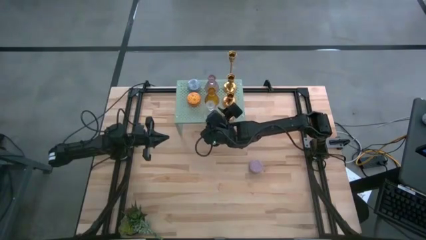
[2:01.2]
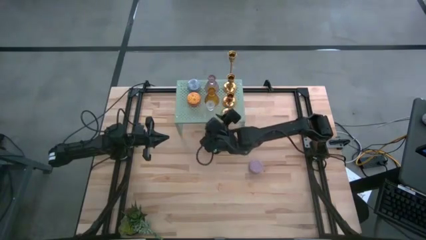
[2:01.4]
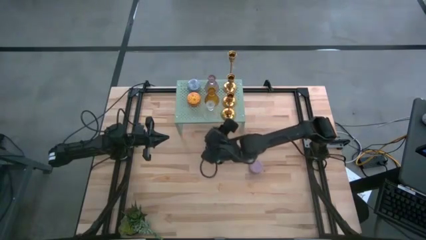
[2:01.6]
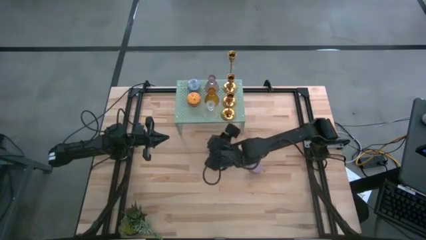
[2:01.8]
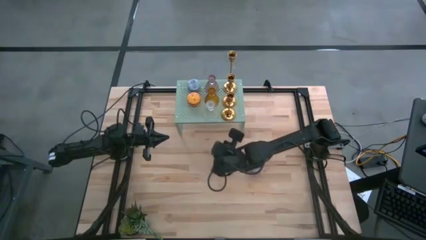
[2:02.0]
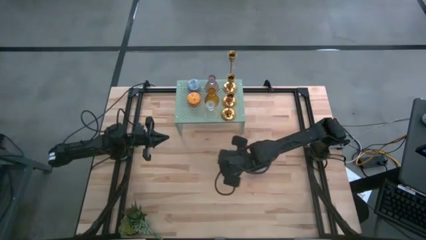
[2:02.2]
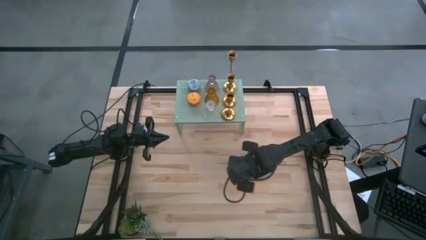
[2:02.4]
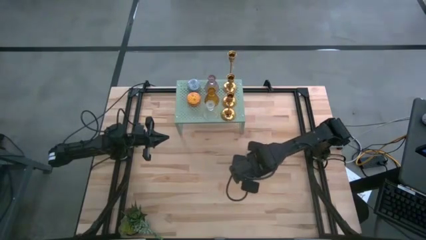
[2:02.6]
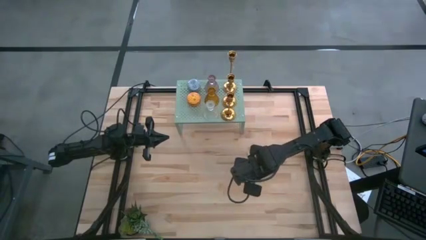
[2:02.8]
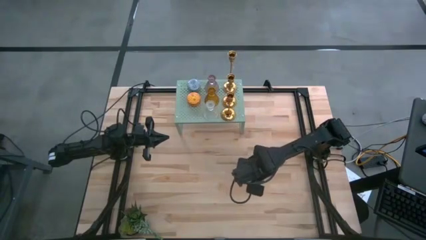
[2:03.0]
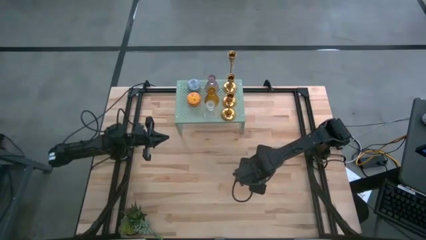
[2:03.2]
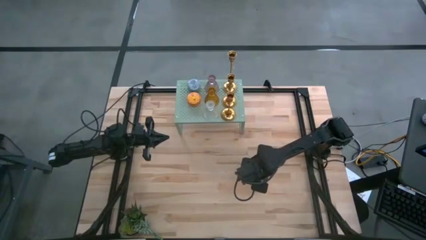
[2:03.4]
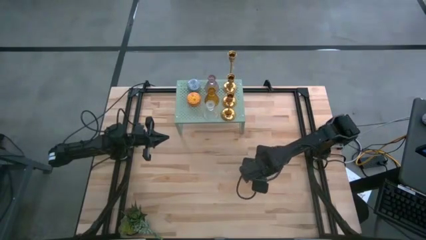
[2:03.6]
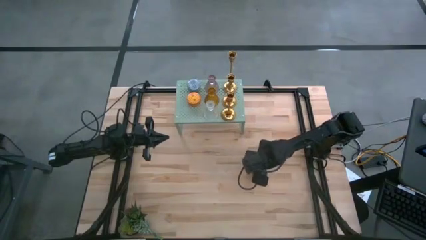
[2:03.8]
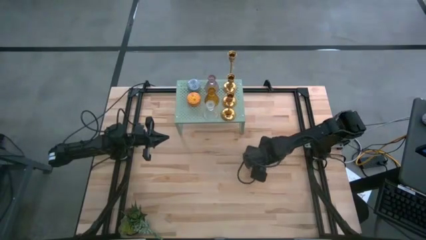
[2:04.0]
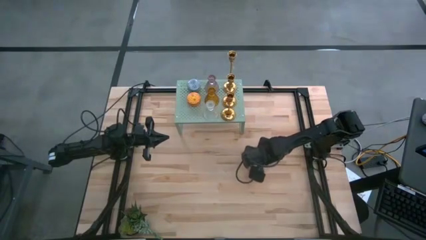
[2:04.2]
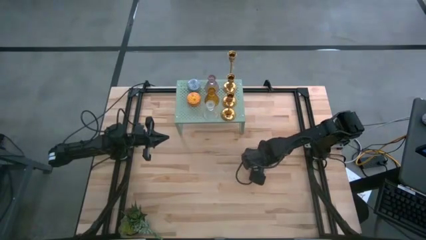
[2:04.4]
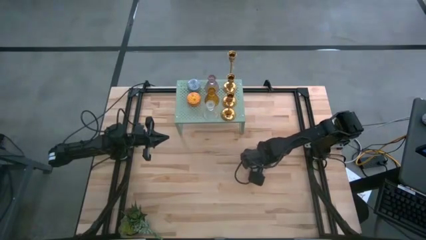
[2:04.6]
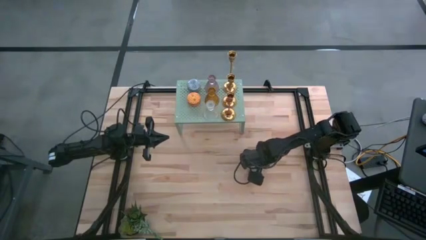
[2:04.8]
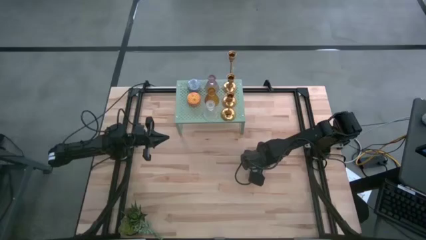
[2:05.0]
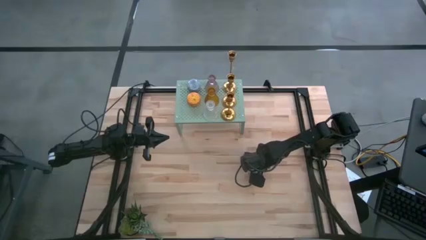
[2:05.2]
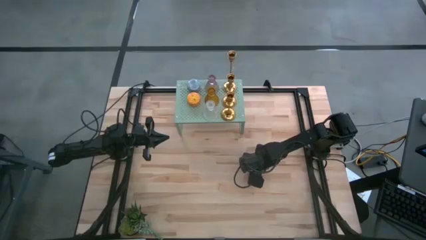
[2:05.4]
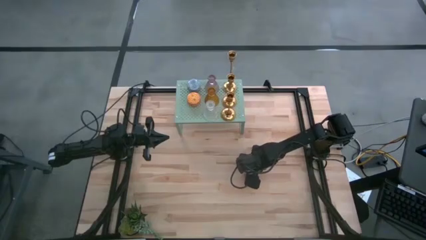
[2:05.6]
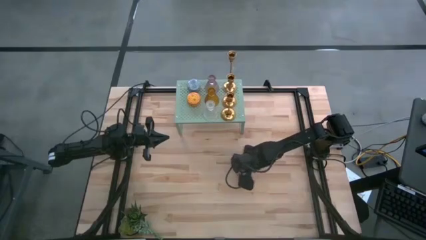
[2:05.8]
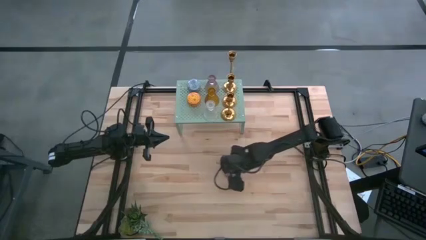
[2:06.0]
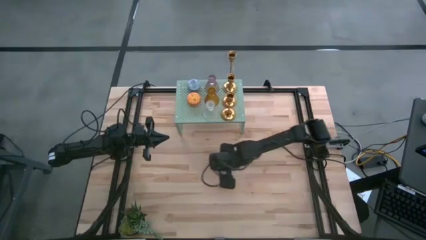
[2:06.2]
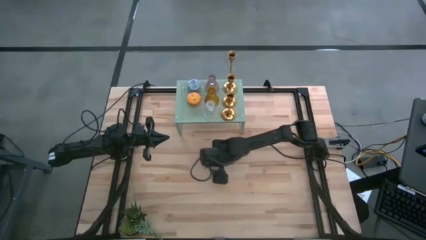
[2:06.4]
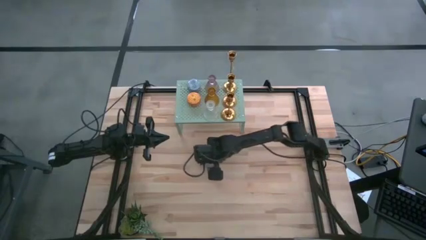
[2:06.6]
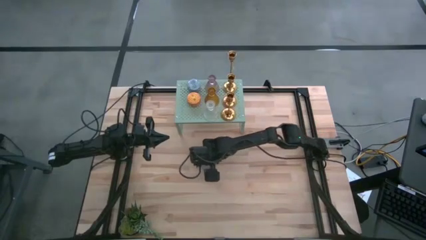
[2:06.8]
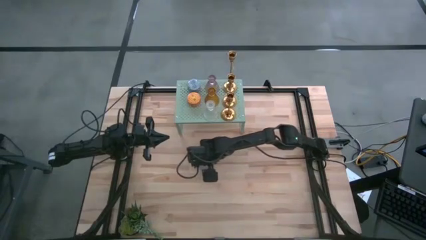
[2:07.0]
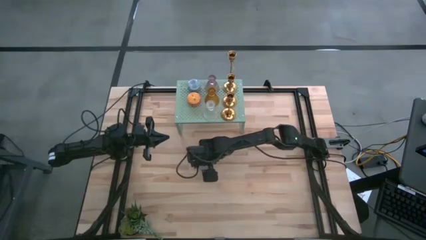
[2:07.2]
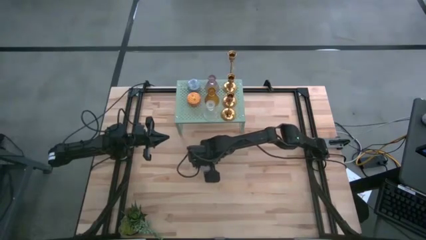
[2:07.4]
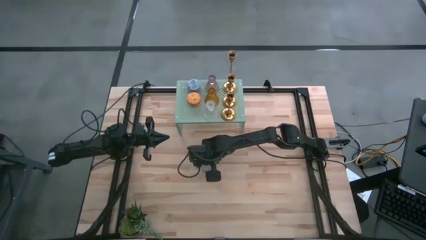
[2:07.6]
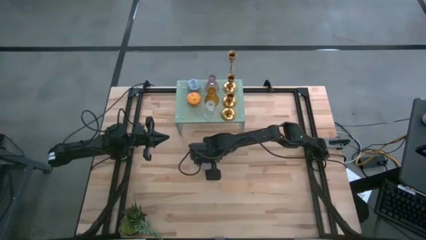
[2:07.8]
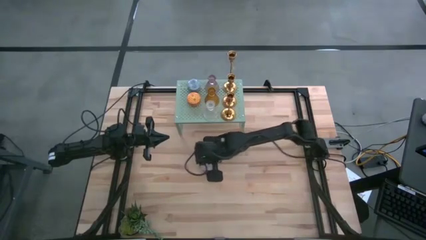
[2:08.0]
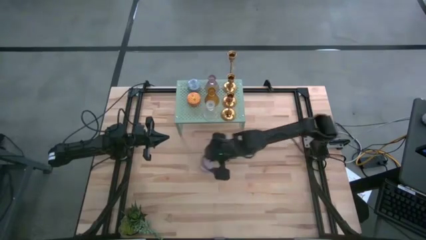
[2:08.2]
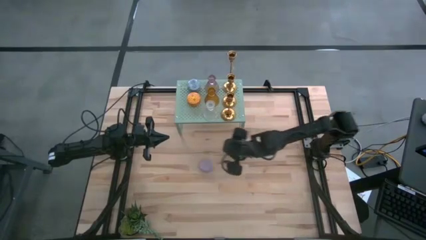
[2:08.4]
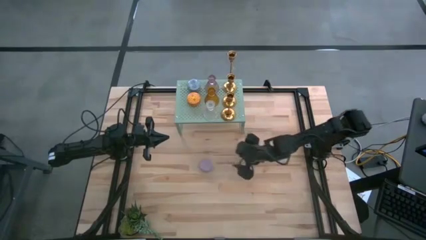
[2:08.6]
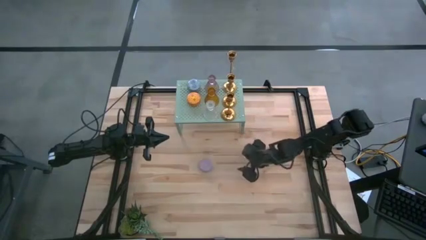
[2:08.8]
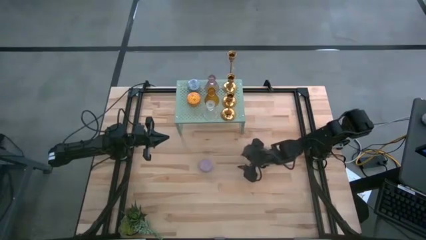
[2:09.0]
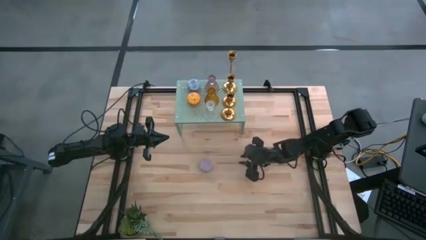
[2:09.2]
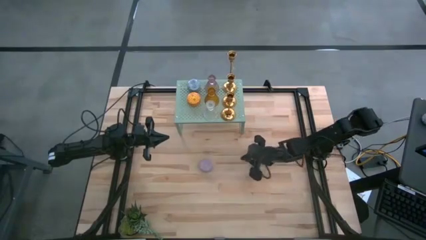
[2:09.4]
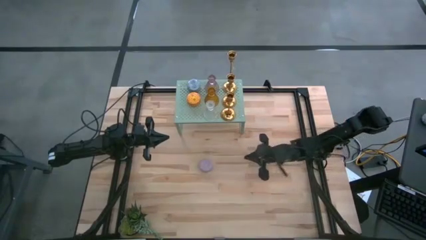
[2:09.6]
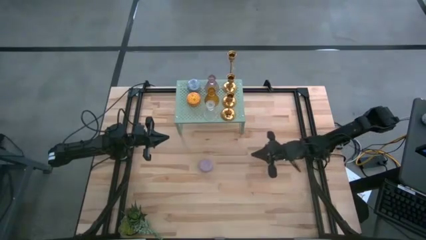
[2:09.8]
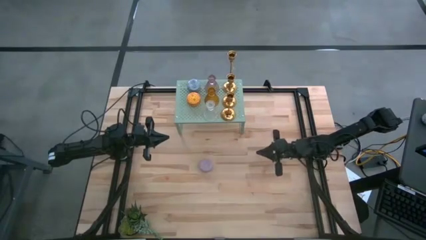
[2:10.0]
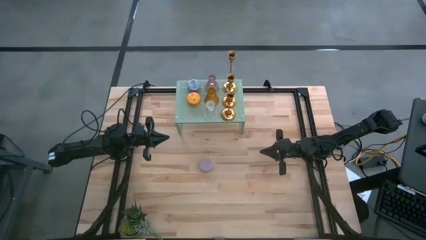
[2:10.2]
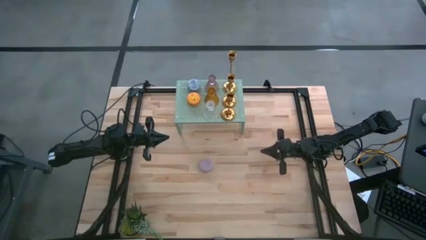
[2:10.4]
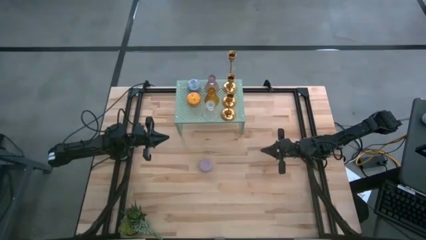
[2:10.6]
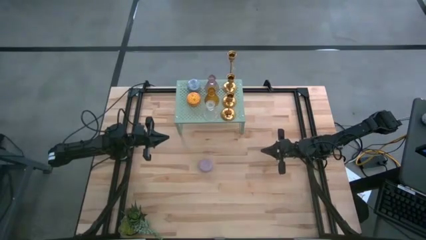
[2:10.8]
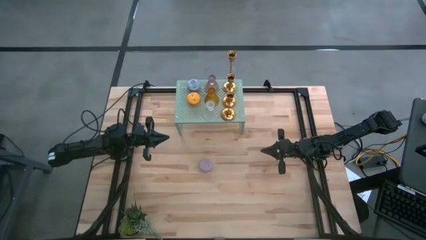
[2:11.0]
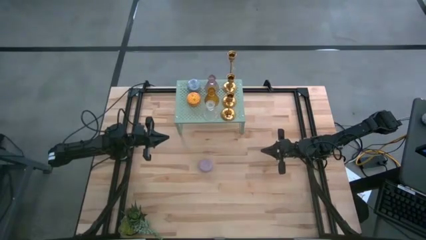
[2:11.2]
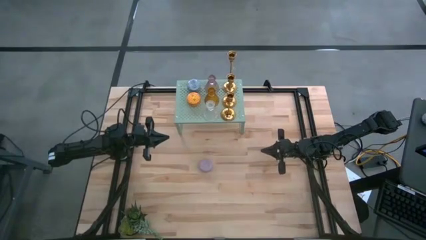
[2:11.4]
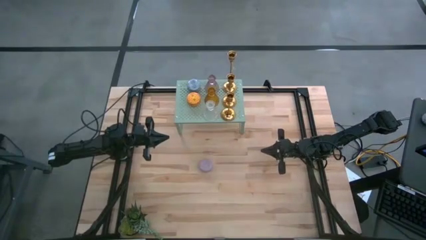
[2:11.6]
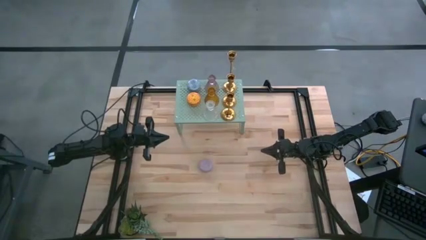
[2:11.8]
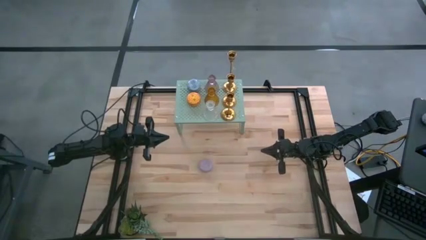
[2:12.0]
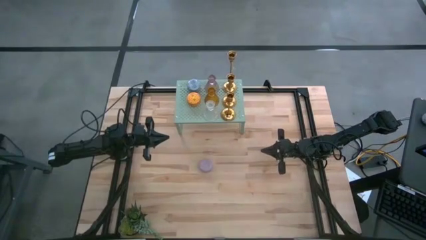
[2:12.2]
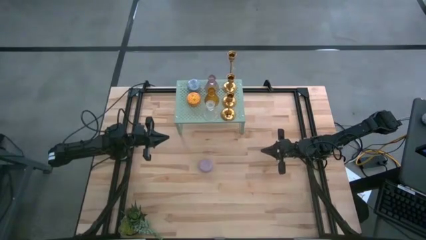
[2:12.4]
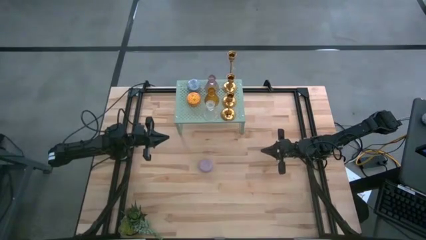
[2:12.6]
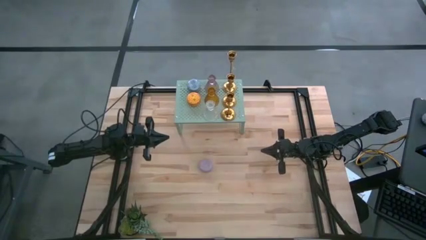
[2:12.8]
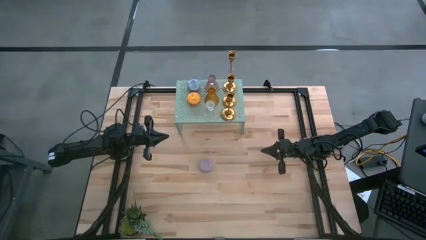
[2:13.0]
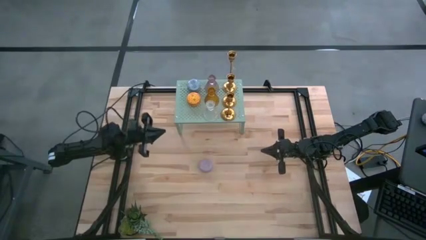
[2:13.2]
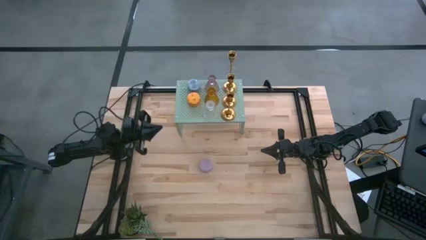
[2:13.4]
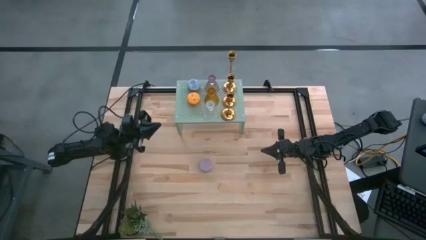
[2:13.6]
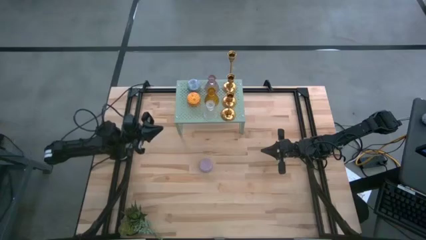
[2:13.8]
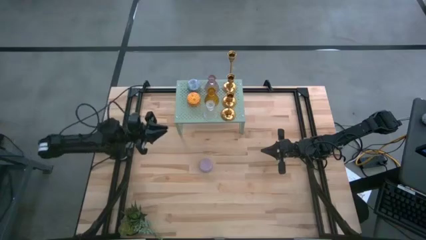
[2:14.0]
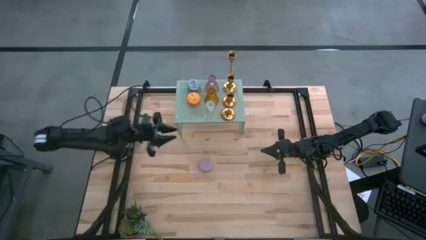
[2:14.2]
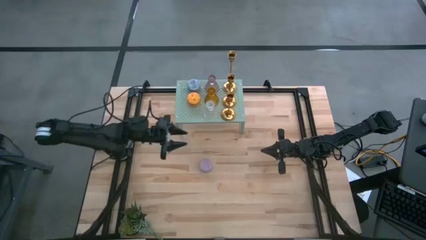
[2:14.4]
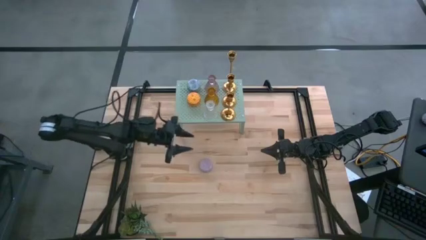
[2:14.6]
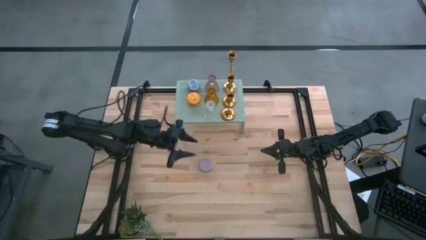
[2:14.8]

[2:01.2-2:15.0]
Task: Pick & Place candle stick holders
Put the pink patterned scented candle on the shelf aligned with the pink patterned scented candle
